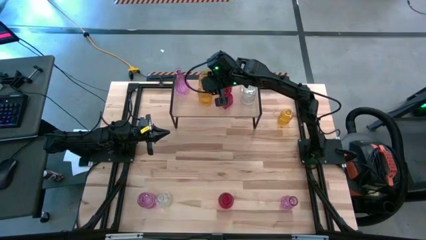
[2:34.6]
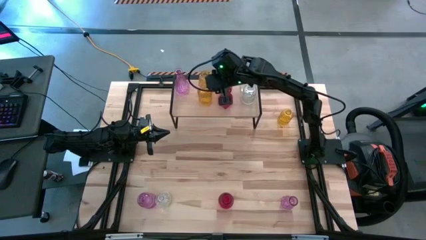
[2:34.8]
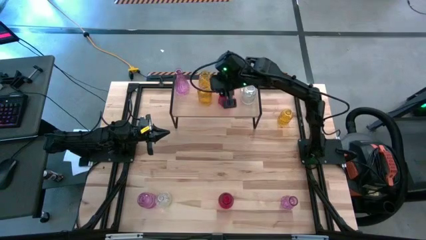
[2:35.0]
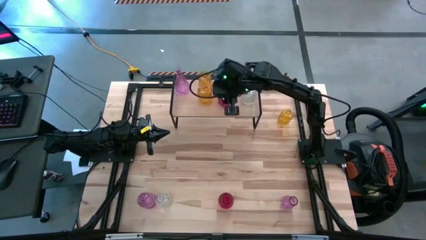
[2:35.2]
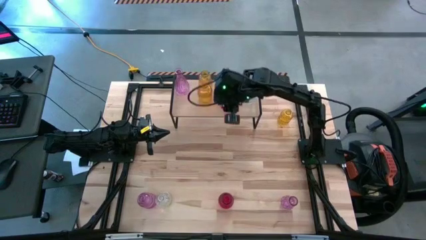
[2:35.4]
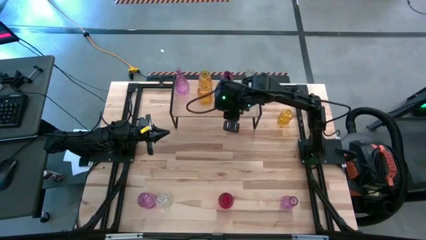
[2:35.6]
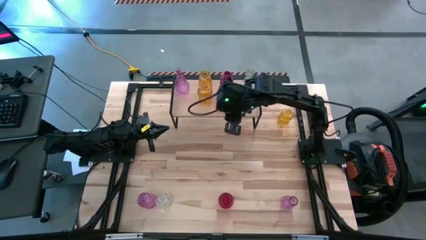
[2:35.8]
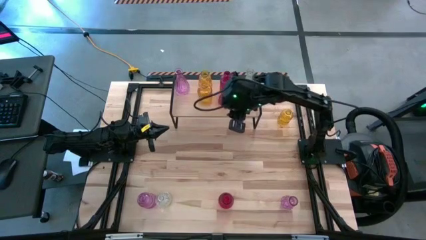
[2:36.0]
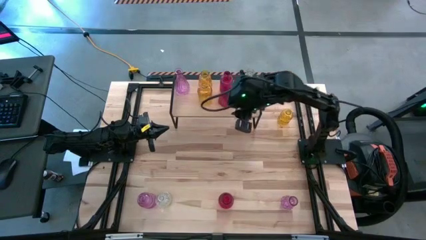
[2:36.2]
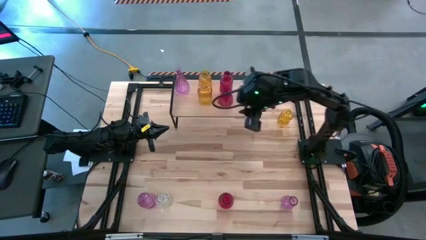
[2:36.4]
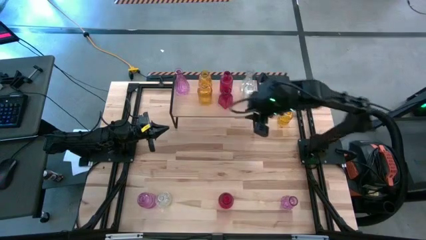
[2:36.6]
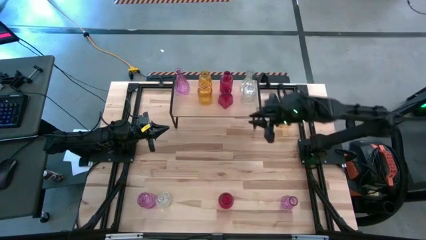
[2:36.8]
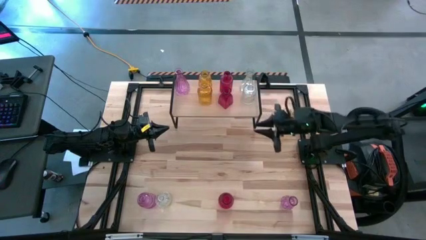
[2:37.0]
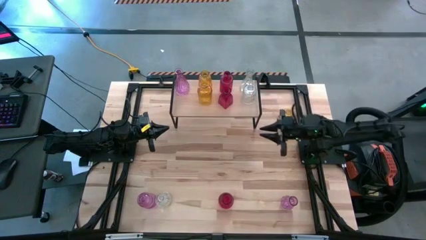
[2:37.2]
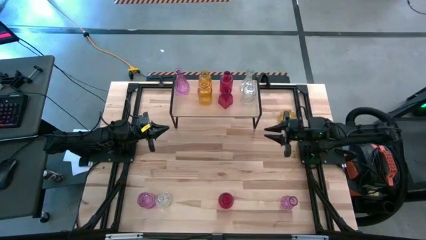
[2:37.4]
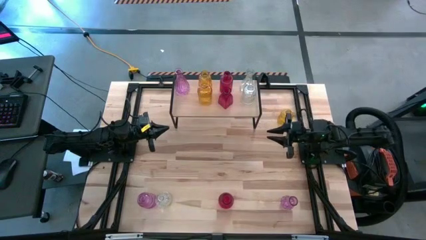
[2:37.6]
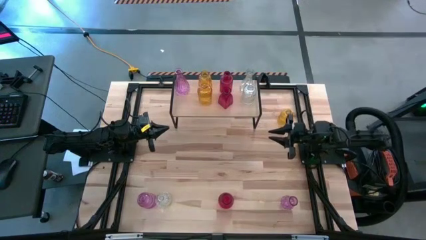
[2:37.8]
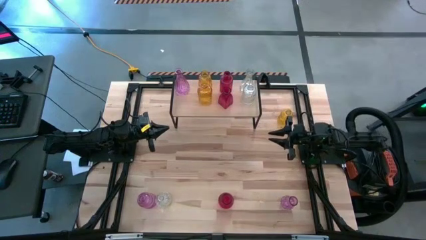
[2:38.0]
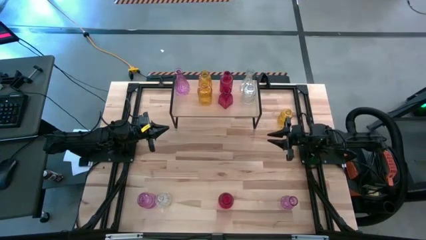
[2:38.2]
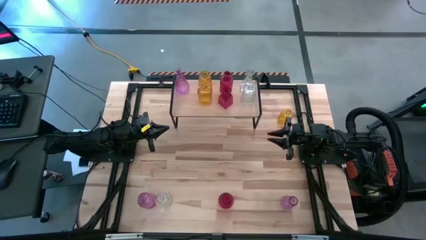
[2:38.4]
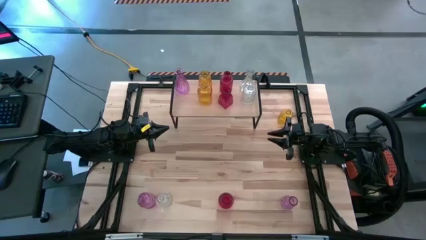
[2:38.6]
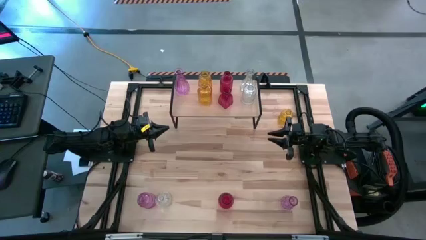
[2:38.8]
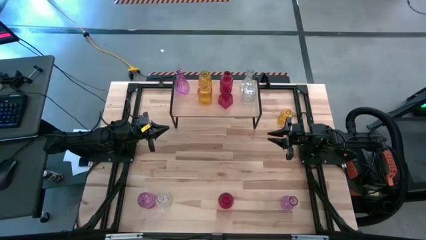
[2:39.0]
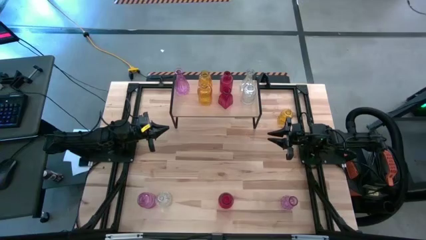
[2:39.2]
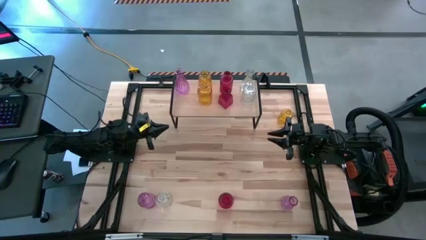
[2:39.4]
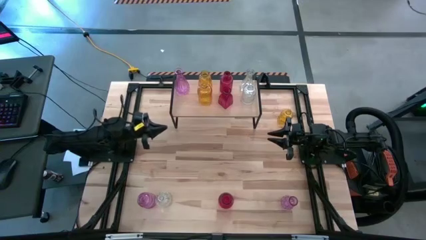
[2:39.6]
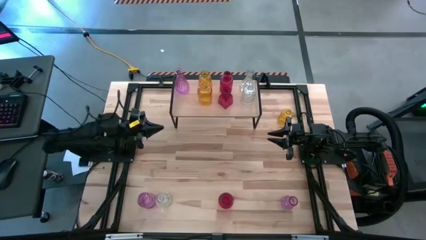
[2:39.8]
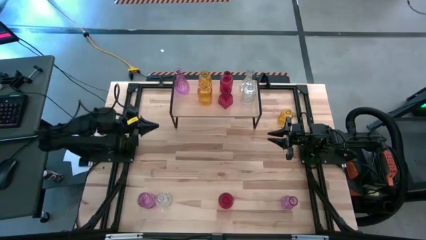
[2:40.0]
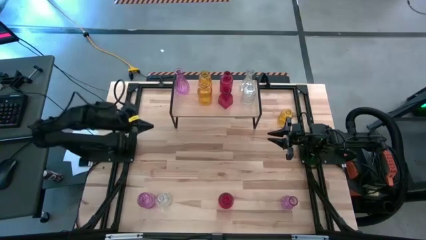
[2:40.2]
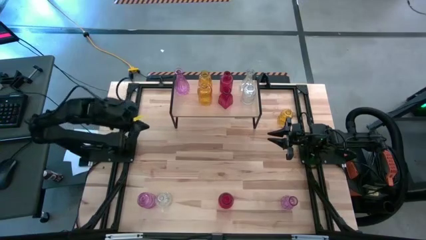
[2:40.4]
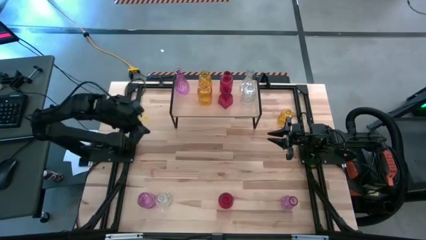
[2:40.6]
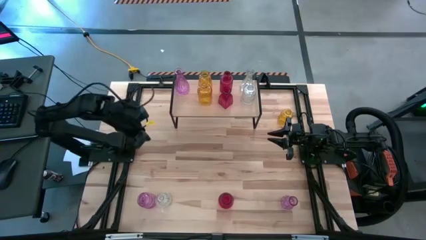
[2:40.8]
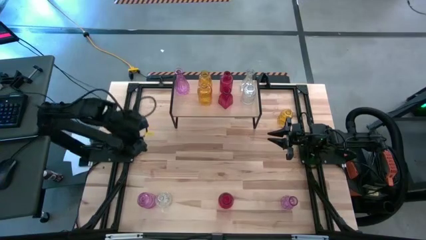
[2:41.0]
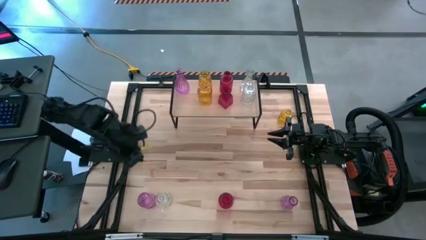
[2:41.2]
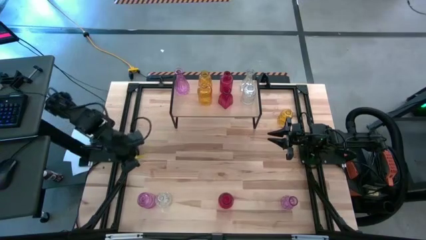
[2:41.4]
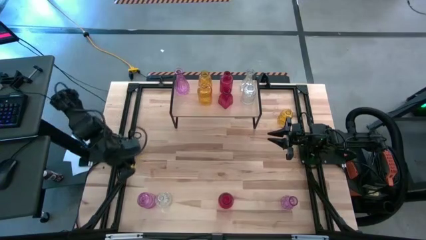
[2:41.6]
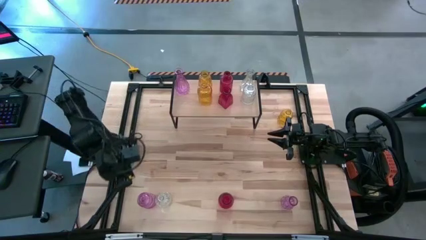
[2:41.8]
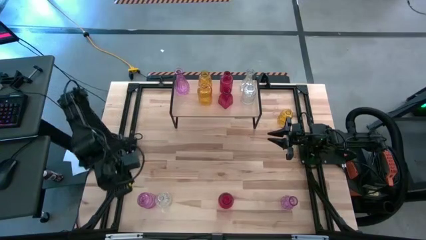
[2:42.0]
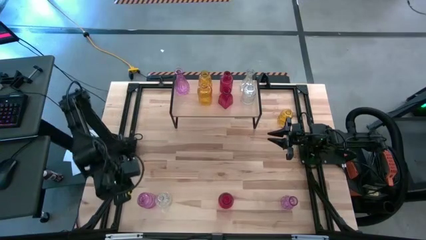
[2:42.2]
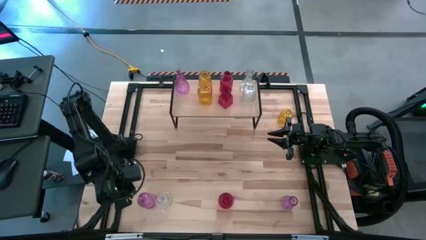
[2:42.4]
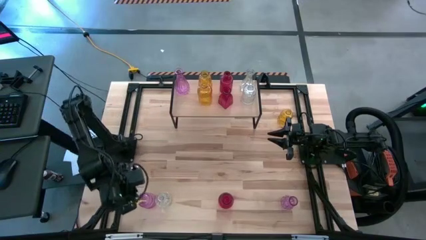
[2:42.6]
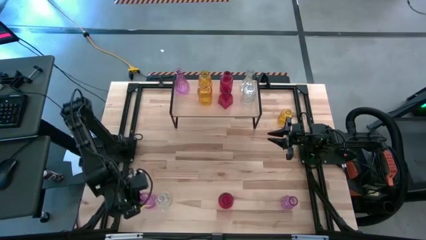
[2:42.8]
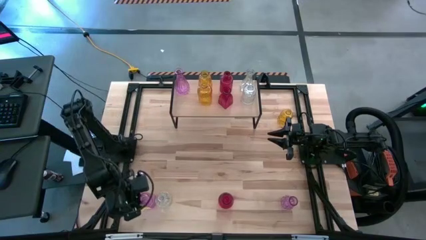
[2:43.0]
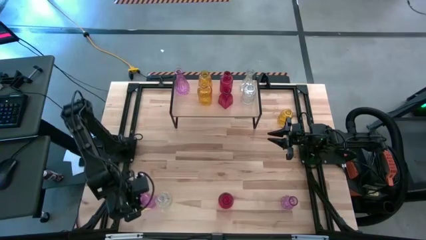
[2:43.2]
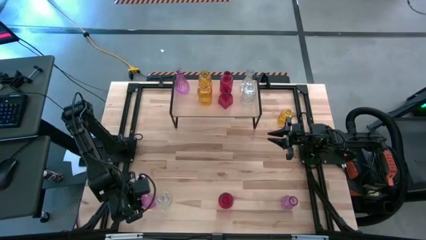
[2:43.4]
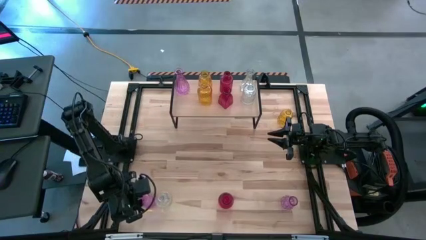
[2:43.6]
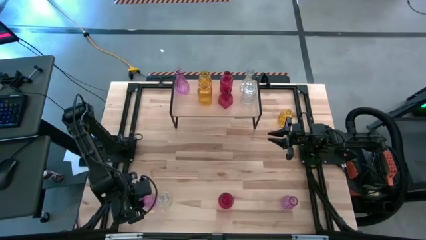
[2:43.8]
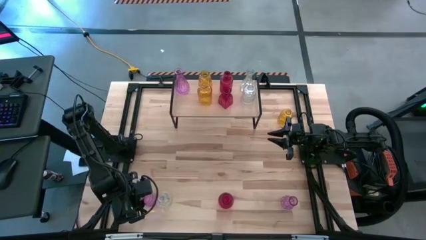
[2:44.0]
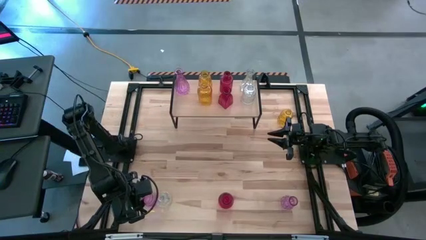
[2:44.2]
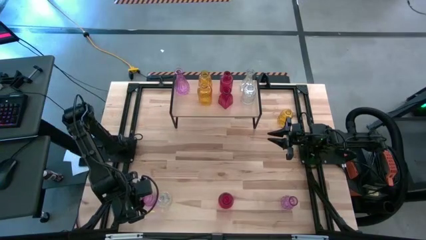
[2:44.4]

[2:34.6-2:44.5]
Task: sort vases onto shelf
Put the left purple vase on the shelf and align it with the other purple vase

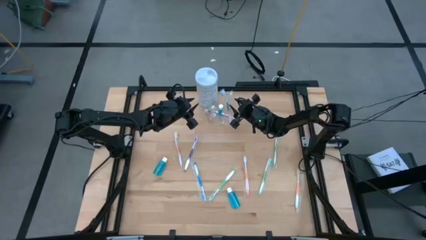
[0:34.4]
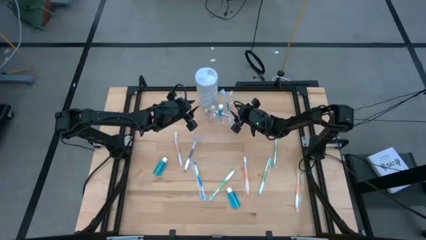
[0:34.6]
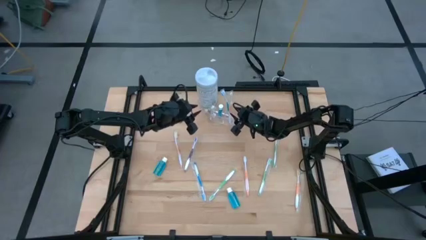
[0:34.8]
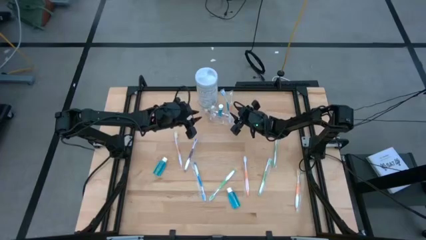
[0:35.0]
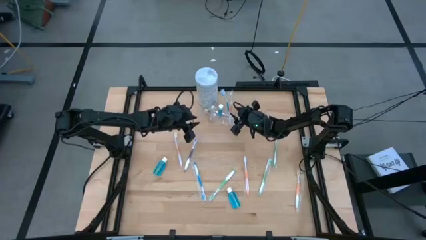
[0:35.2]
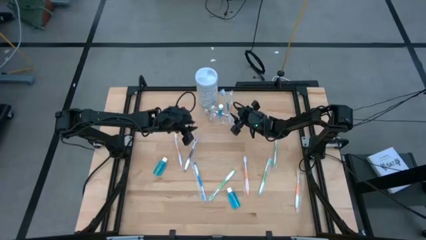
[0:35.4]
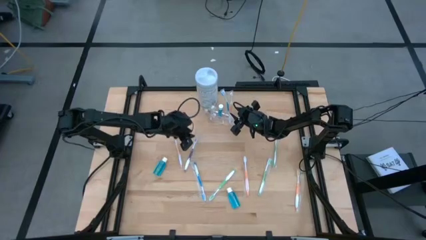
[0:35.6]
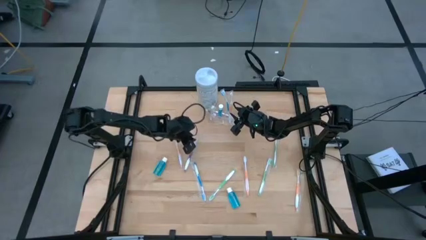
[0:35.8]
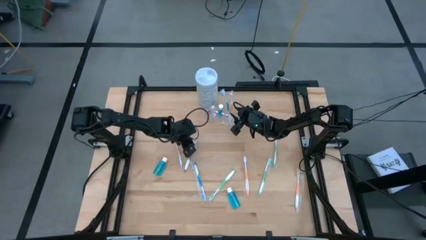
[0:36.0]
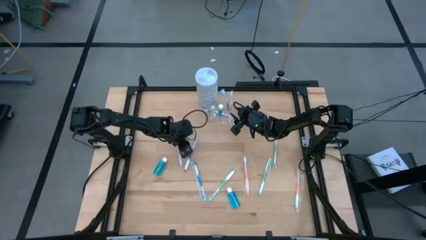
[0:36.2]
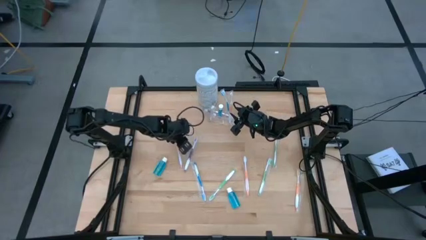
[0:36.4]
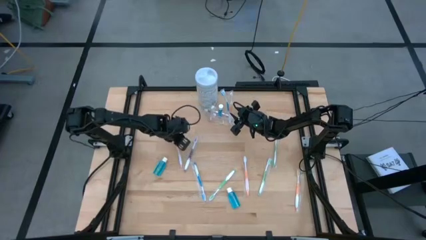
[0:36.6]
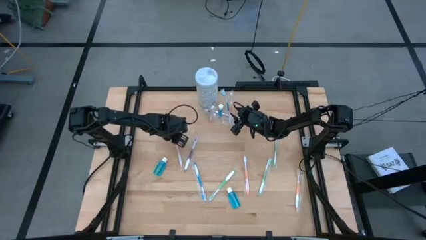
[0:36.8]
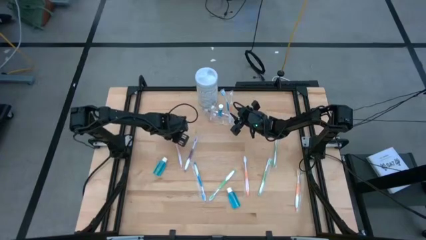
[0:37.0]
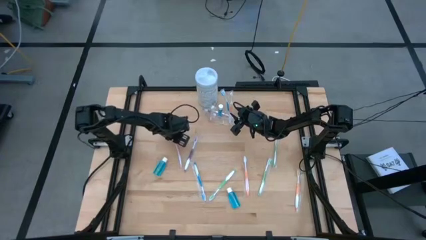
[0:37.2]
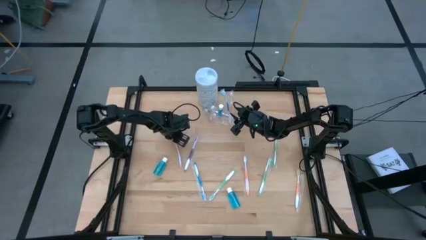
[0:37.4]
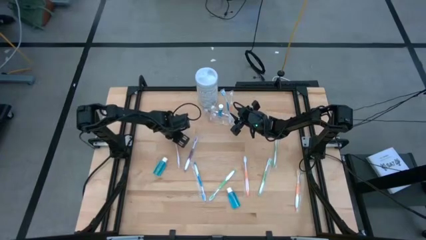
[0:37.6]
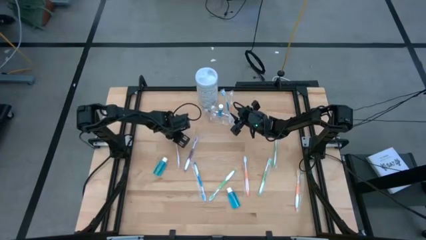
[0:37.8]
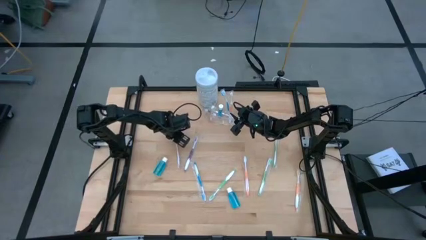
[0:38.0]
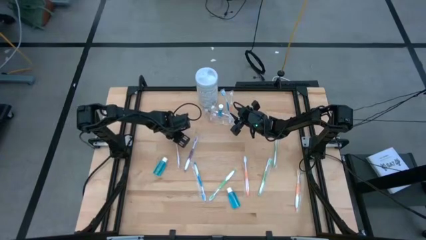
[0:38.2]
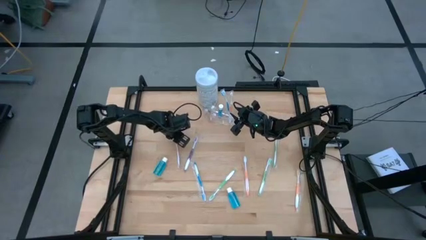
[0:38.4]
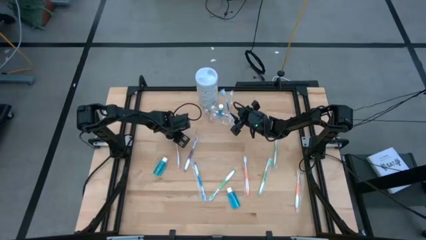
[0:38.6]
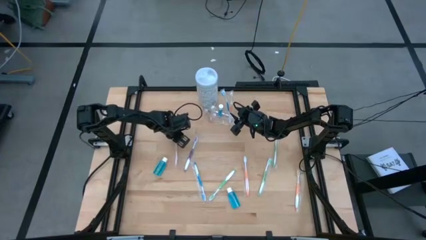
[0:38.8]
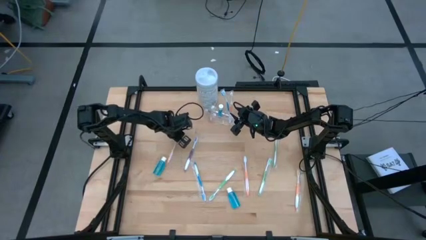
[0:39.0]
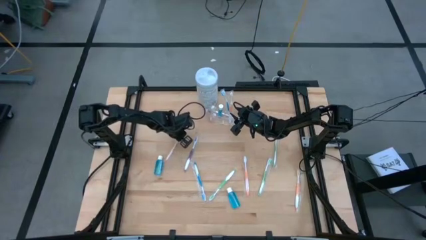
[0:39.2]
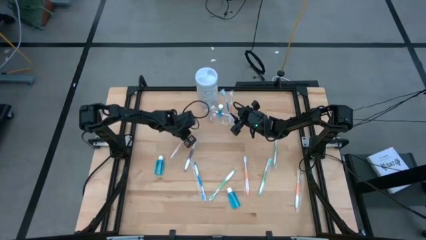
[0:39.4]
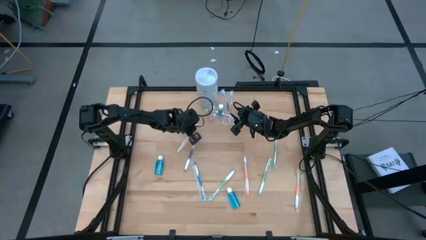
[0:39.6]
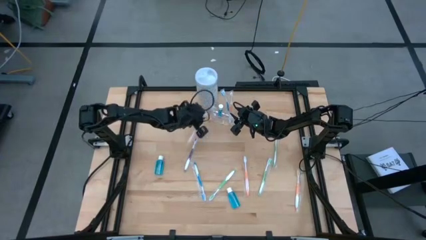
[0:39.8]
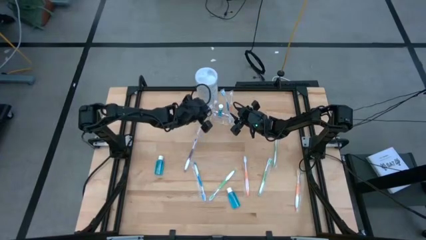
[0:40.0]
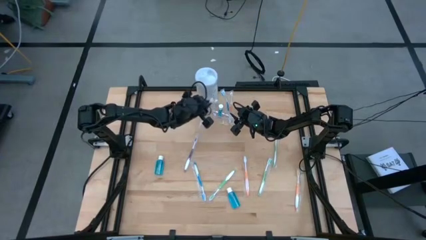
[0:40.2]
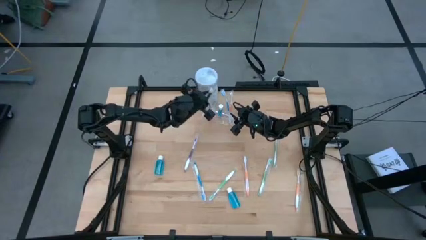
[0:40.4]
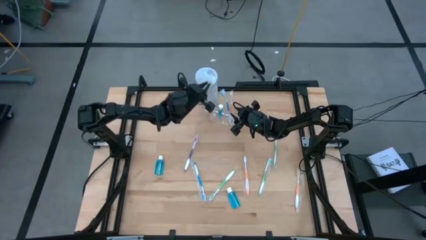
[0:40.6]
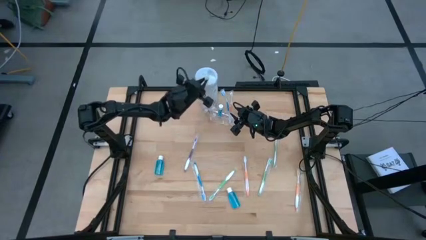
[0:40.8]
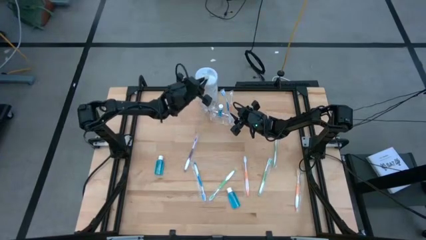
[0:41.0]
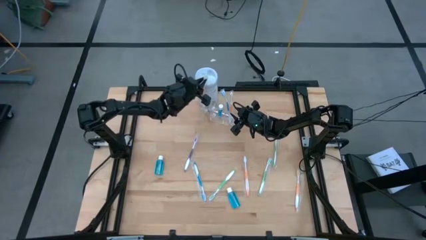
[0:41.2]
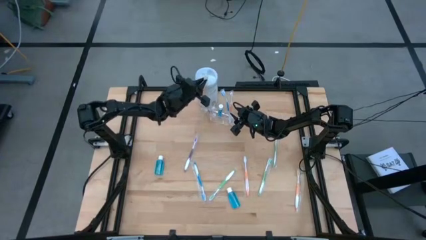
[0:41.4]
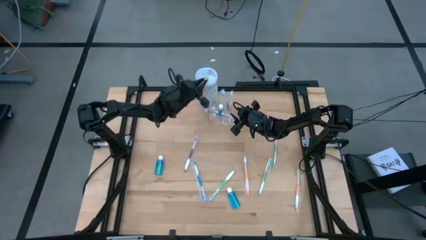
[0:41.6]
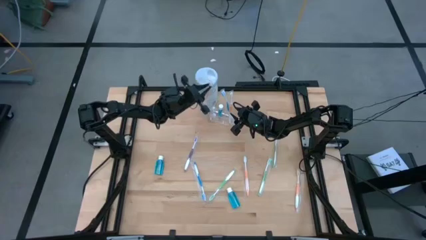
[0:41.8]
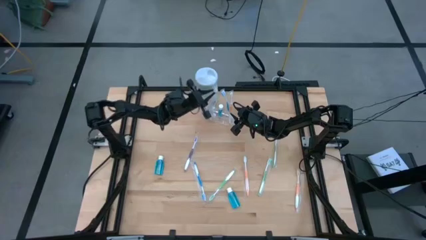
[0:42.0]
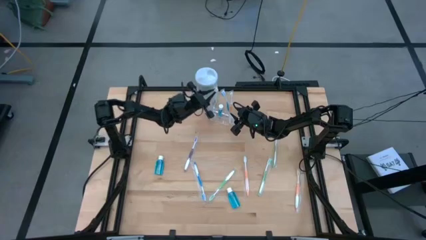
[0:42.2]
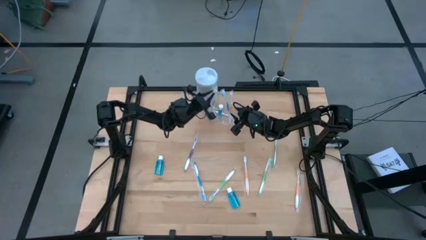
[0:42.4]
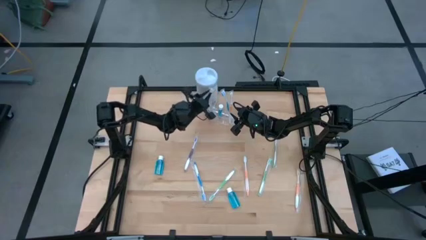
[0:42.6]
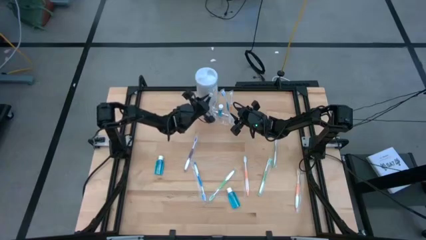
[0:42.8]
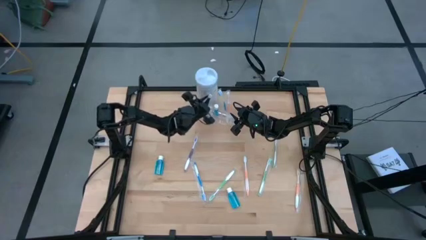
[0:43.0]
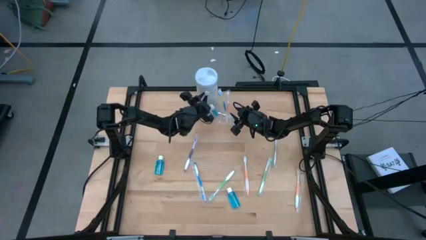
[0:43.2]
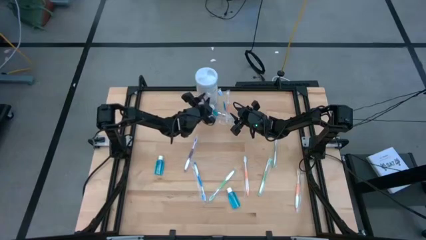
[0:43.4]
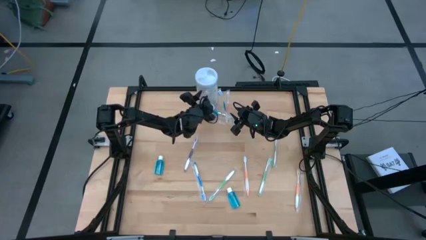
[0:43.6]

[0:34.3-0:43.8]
Task: Pick & Place toothbrushing station
Put the orange toothbrush into the transparent organizer
